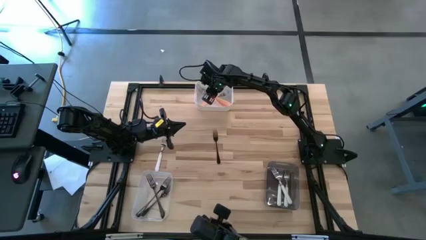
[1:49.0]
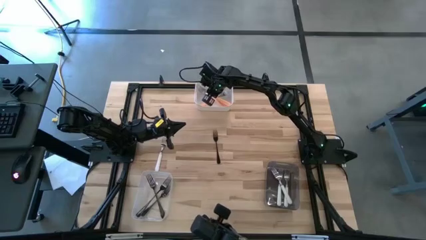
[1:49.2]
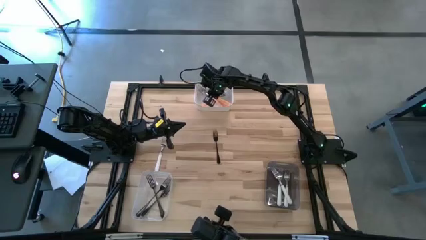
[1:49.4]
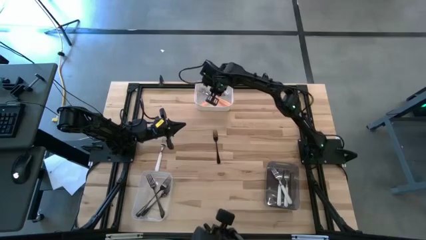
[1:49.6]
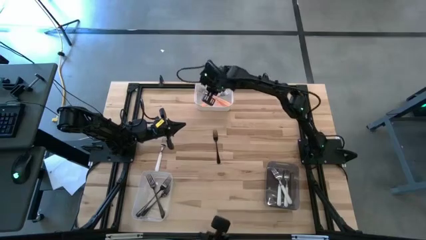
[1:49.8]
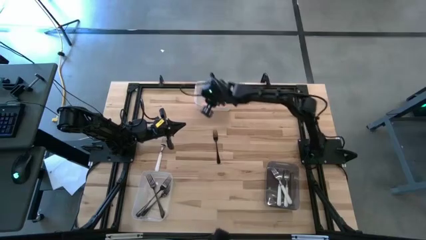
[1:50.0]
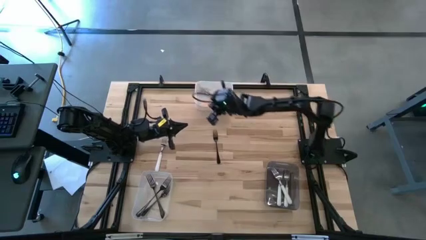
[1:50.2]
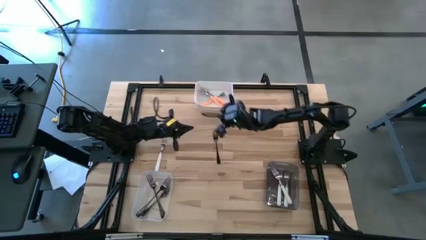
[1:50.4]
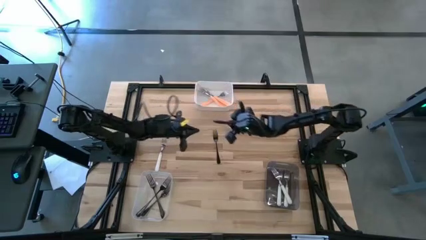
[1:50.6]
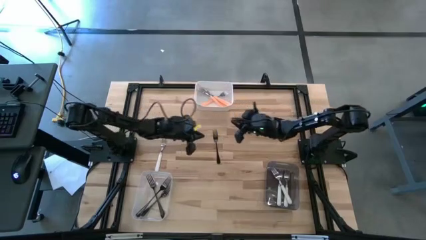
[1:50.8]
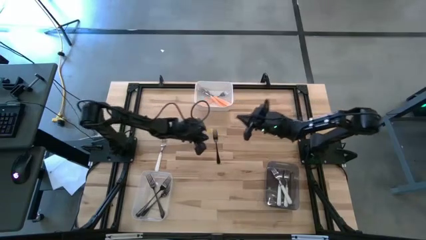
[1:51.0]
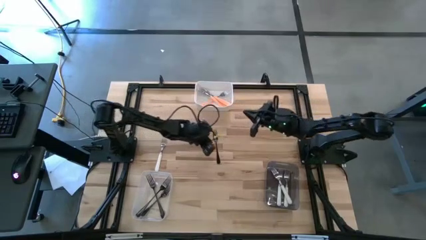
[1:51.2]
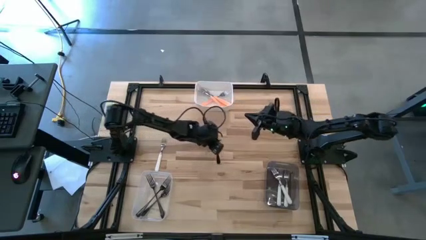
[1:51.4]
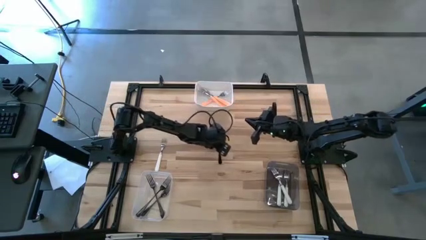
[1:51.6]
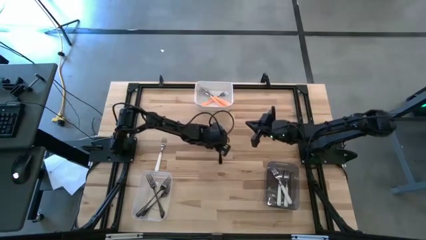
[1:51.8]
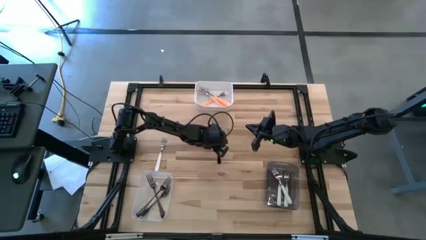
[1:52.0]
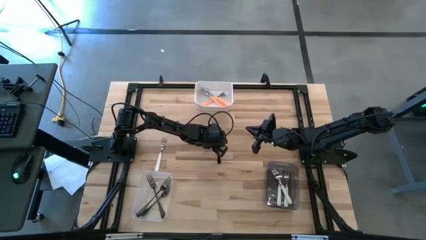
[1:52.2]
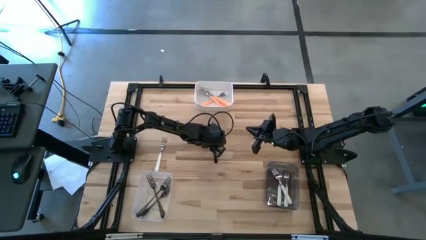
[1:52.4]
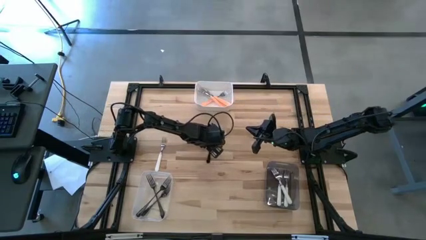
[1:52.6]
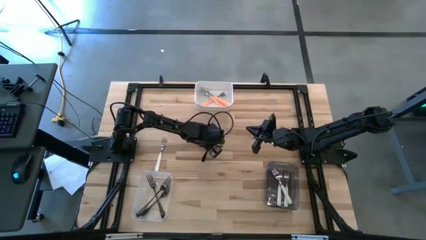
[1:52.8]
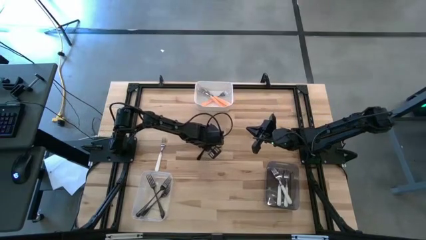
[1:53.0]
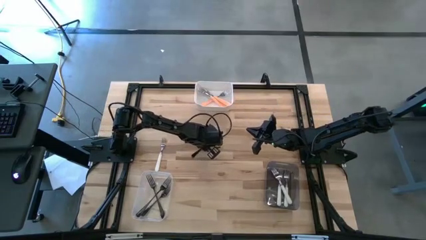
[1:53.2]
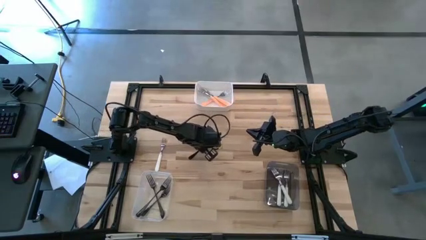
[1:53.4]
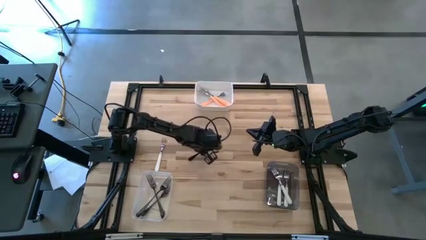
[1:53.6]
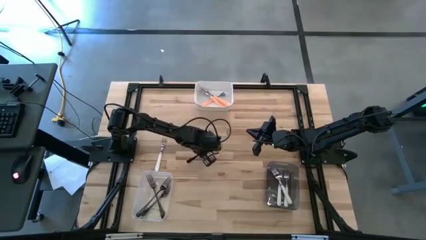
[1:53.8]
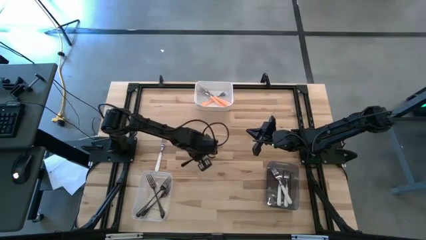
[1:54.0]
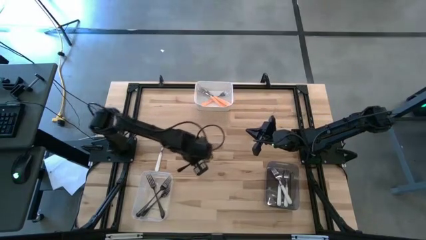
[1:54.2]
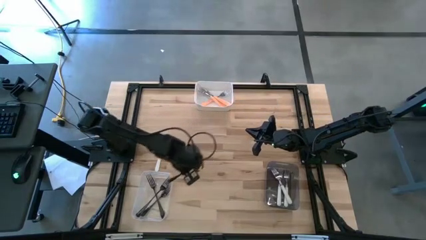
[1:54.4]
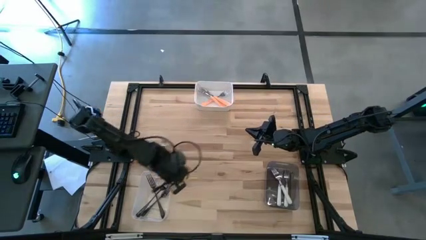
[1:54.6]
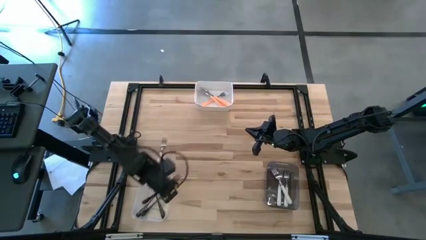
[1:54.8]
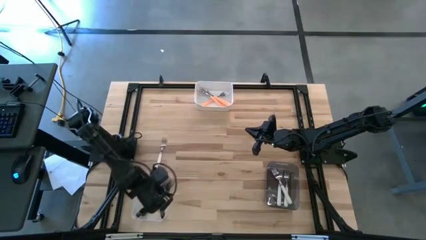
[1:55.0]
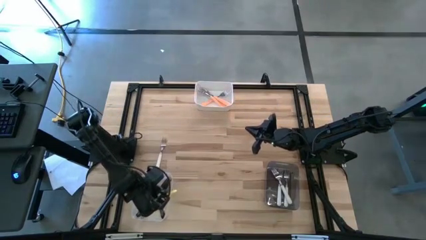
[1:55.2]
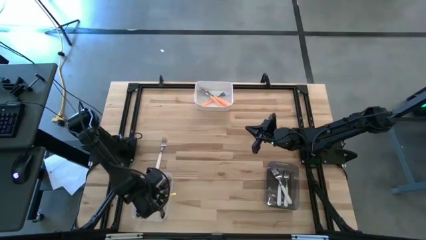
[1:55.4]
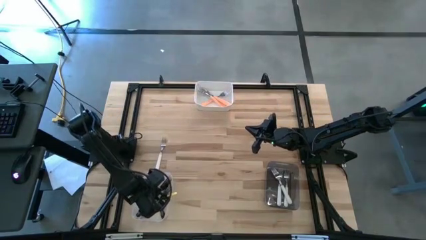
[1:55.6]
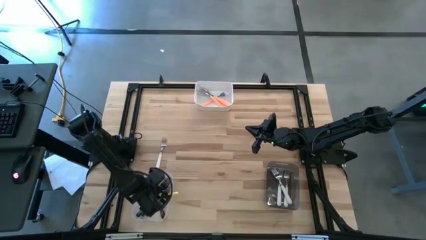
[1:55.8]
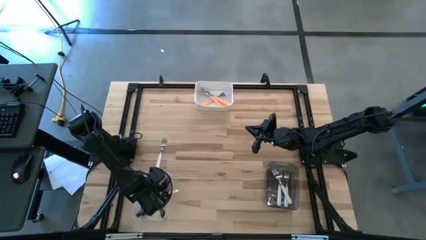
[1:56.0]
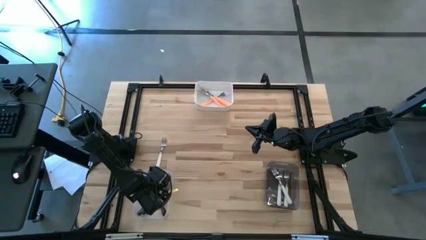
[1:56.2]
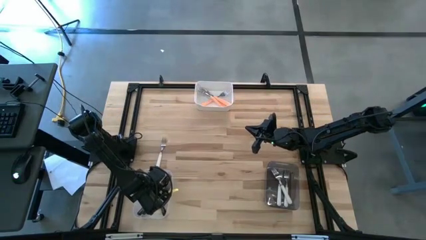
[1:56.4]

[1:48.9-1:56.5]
Task: Sort silverware by color (type)
Put the silver fork into the transparent bin

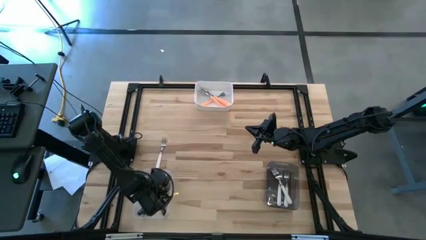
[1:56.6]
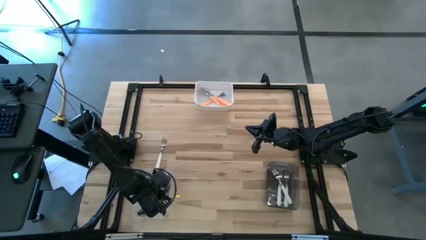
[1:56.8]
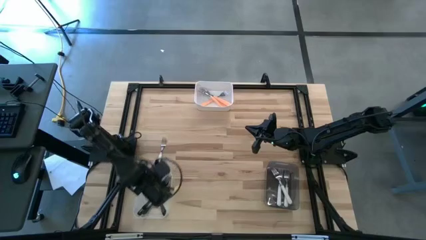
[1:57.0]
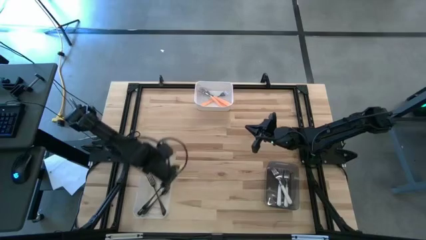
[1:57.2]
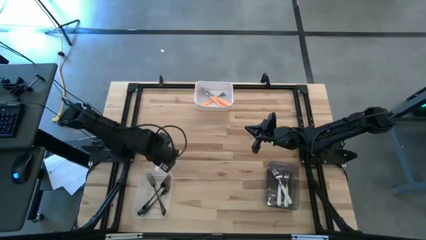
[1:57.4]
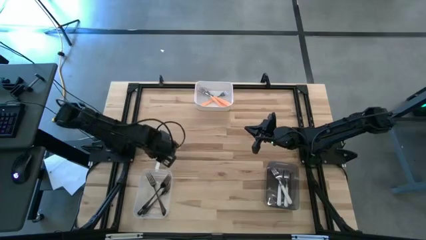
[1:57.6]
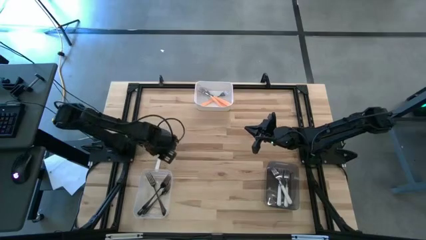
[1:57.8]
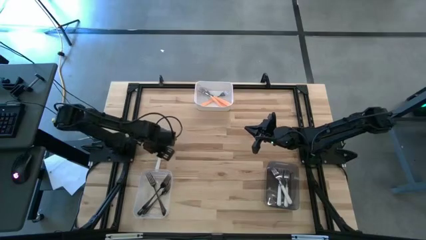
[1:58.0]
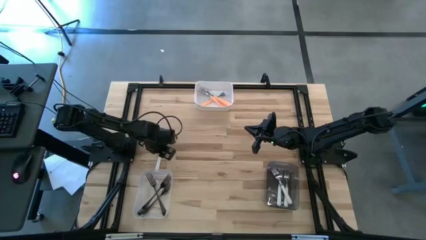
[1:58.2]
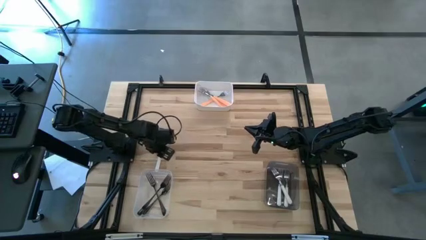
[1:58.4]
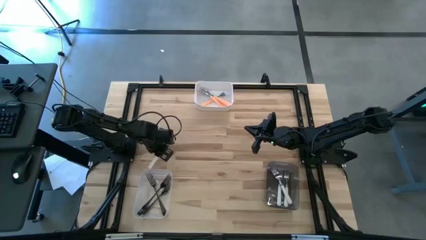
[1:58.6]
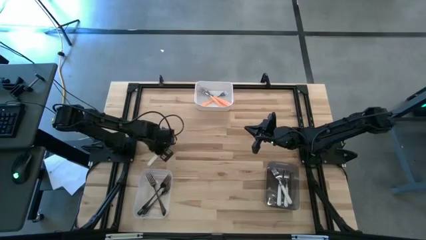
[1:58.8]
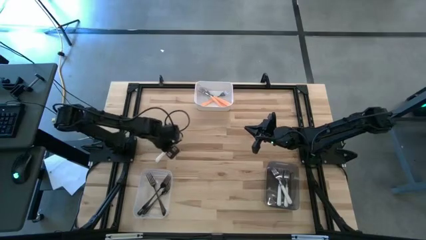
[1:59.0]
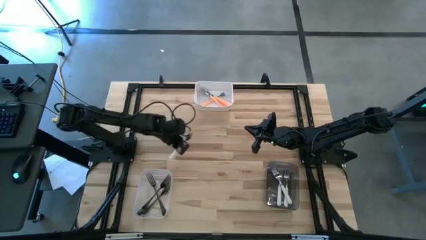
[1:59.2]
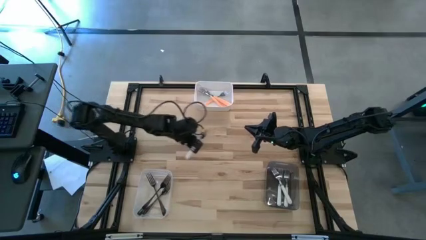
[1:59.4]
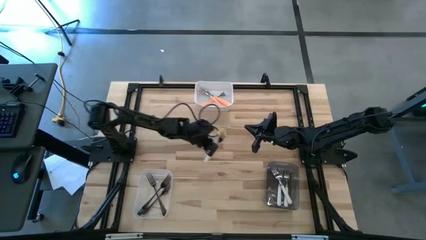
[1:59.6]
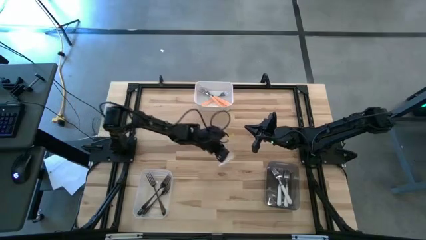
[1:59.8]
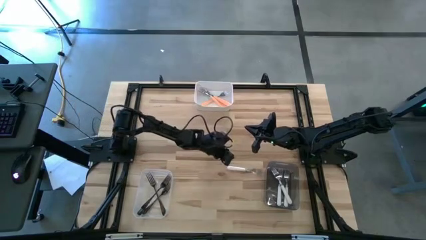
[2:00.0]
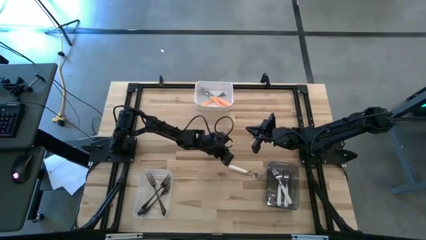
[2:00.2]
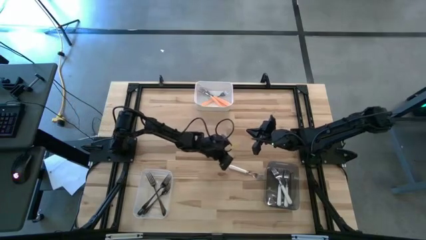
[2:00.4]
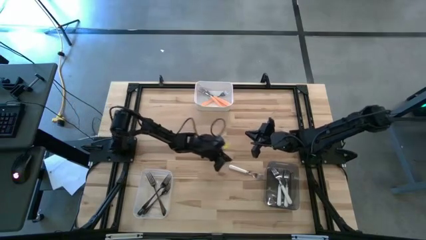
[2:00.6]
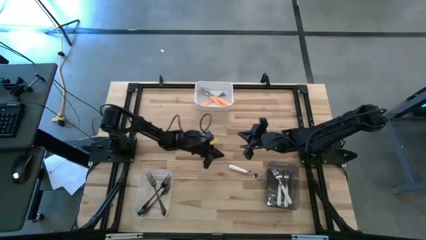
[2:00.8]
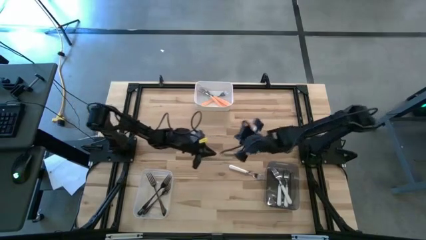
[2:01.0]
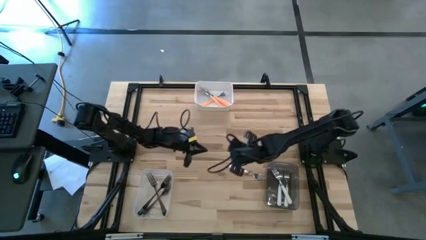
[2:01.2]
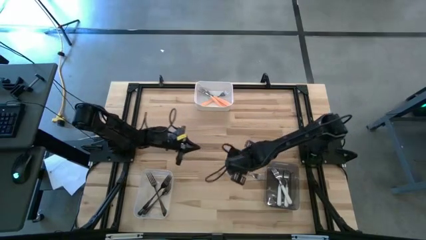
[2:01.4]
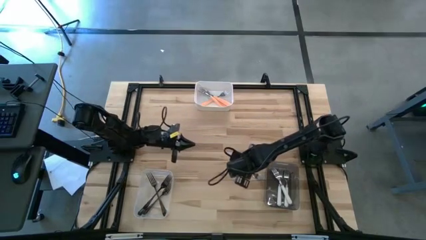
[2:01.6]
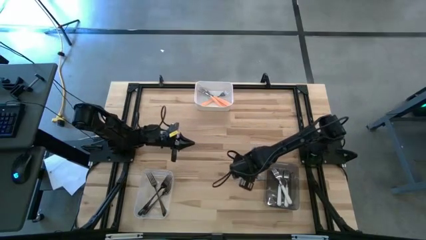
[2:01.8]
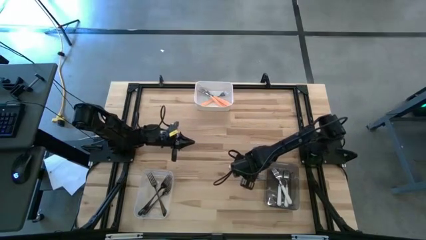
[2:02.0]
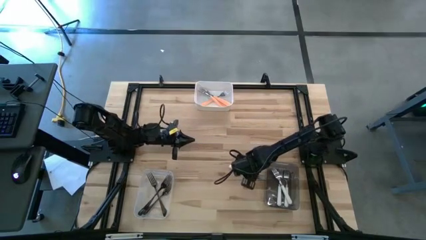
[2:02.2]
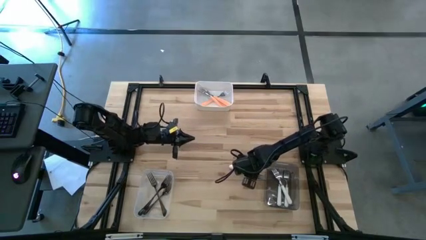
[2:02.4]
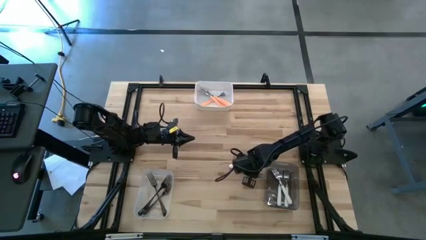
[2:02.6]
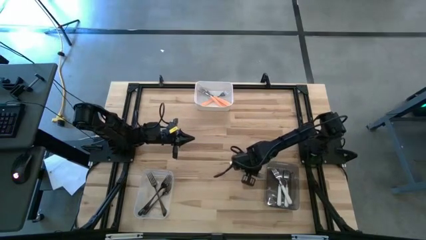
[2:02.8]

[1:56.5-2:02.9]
Put the white fork into the black bin

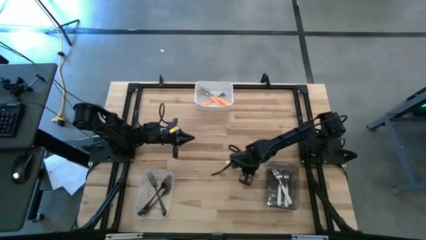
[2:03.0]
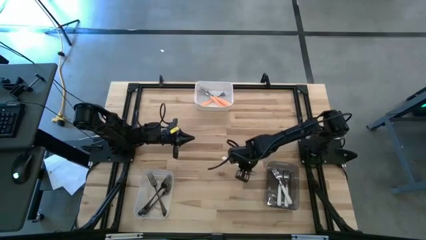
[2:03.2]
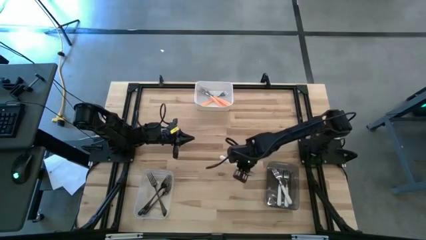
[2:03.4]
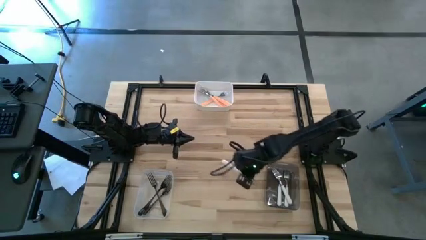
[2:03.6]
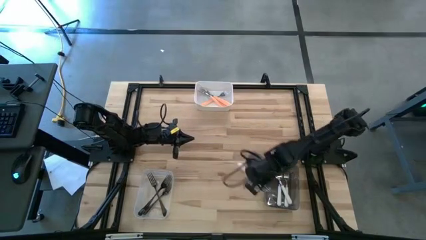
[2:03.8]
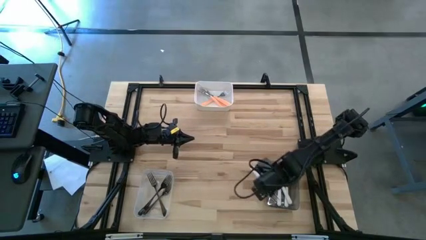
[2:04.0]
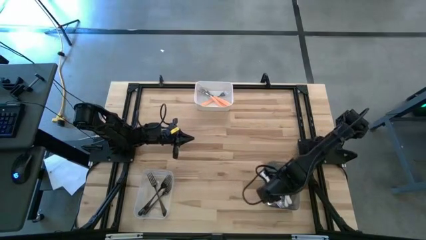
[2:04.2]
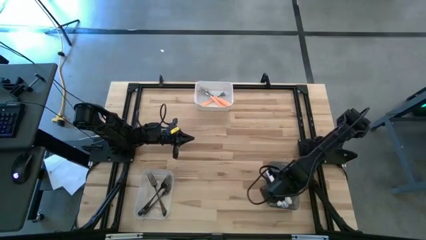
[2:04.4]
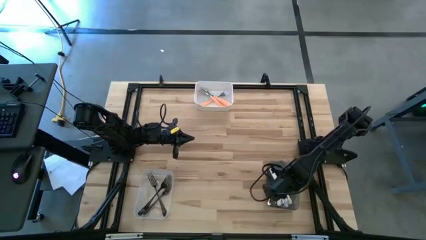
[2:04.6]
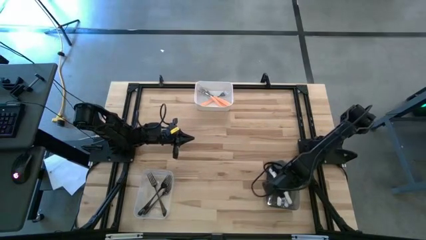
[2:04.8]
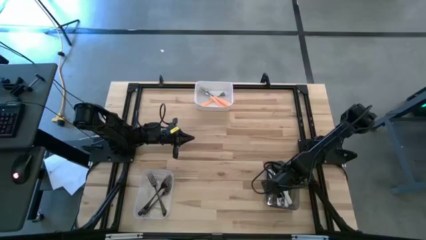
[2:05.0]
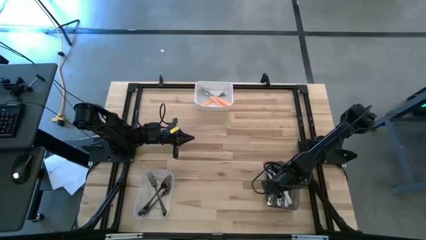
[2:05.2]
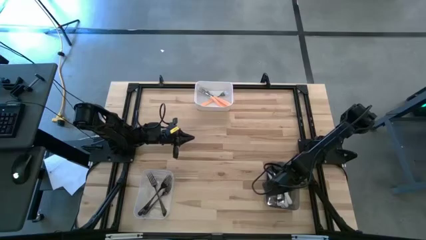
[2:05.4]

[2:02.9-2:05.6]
Put the white fork into the black bin

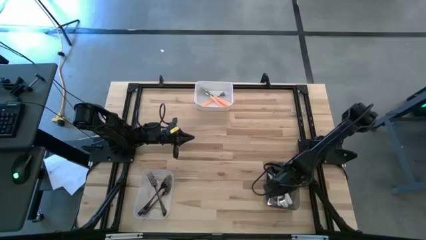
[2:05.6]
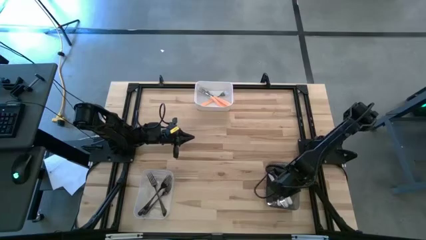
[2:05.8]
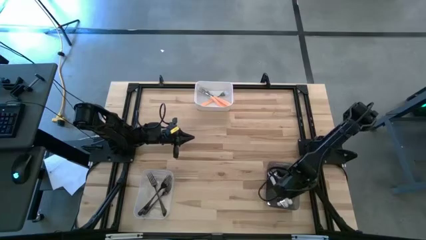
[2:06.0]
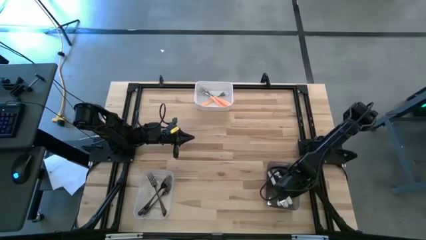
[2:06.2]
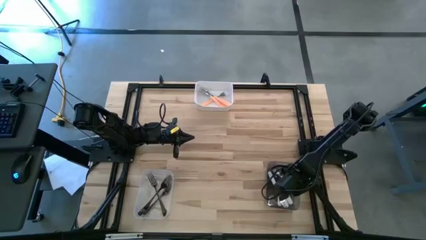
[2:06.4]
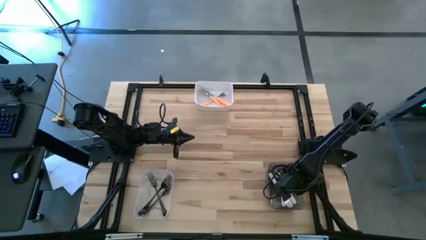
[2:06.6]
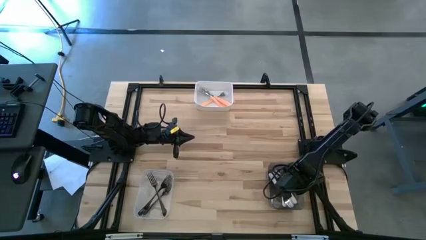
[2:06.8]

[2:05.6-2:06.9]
Adjust the black bin on the table
